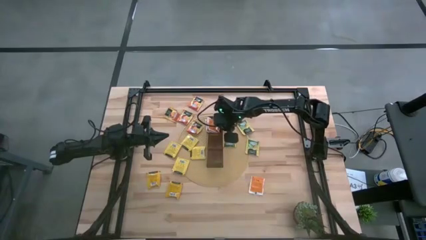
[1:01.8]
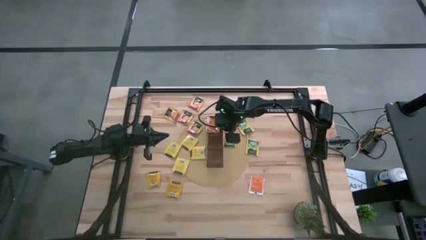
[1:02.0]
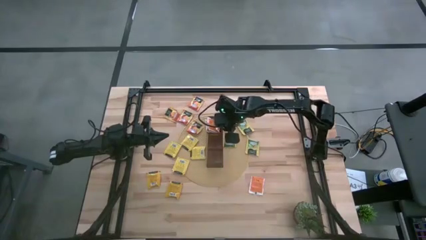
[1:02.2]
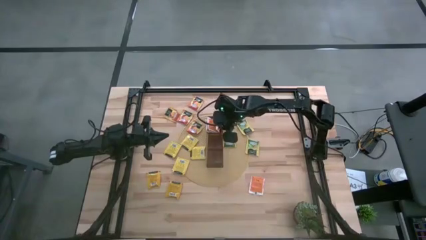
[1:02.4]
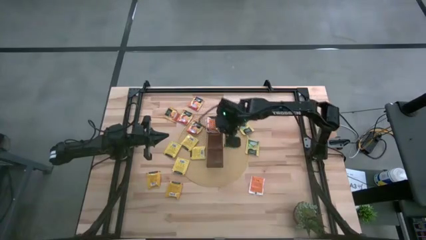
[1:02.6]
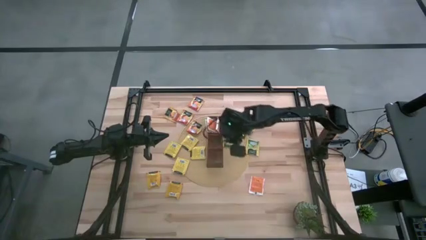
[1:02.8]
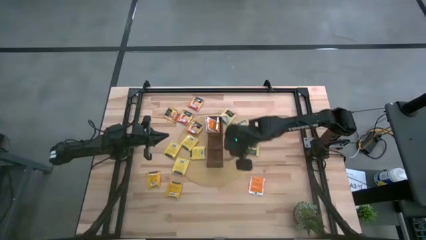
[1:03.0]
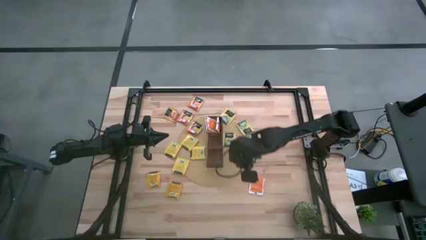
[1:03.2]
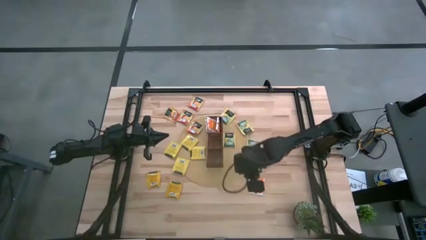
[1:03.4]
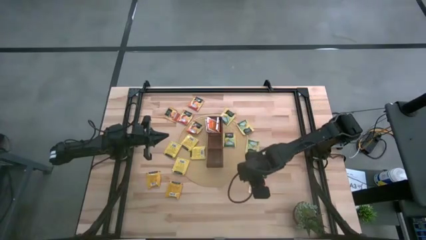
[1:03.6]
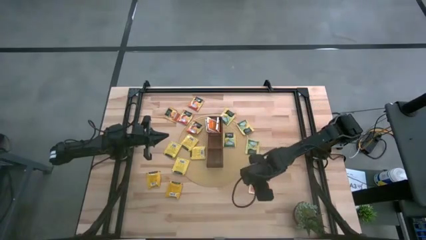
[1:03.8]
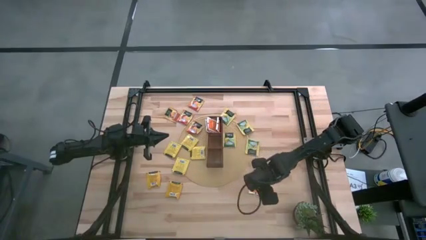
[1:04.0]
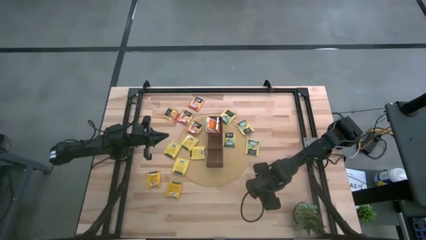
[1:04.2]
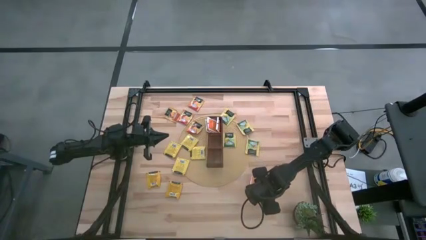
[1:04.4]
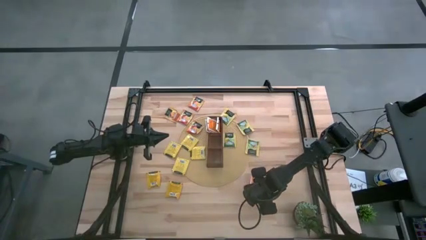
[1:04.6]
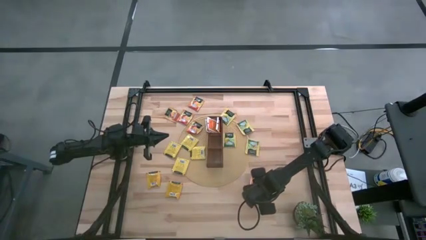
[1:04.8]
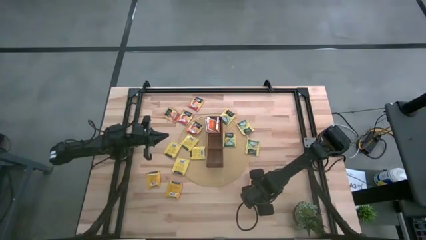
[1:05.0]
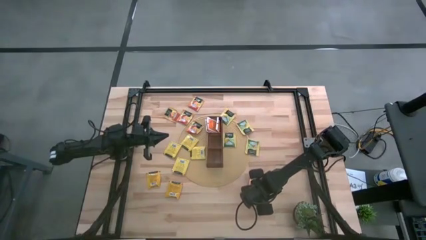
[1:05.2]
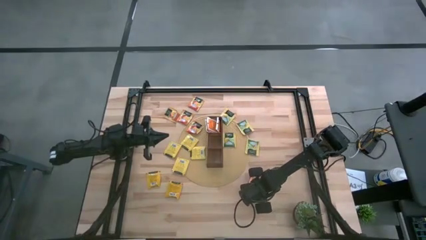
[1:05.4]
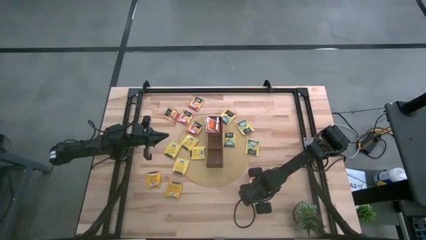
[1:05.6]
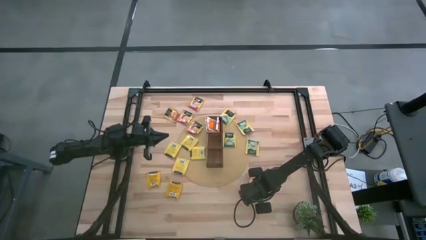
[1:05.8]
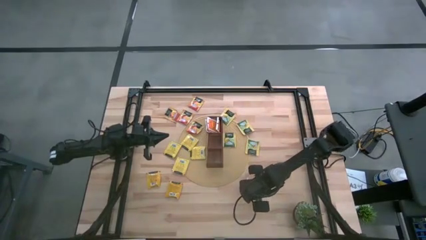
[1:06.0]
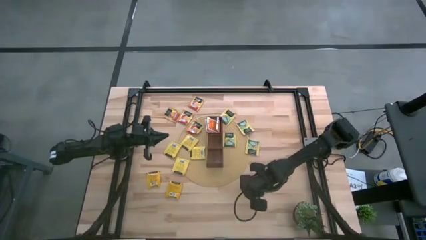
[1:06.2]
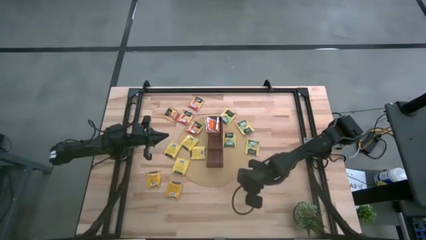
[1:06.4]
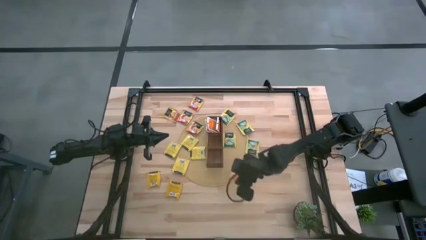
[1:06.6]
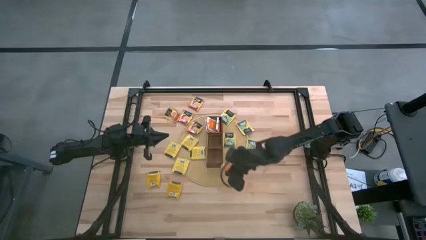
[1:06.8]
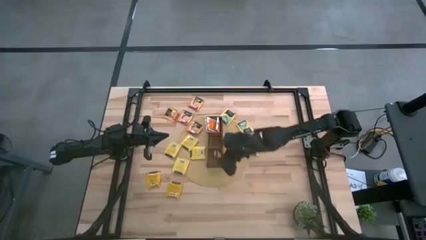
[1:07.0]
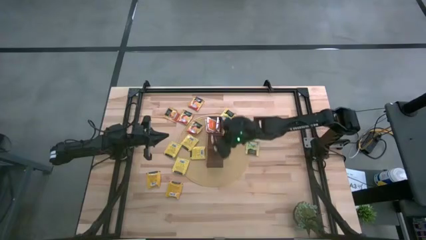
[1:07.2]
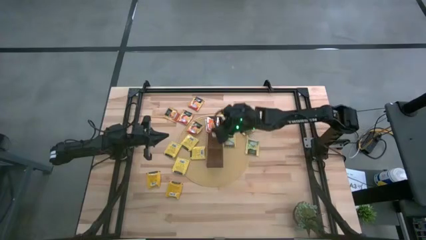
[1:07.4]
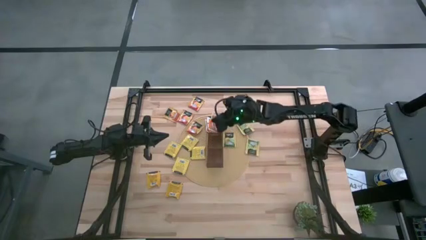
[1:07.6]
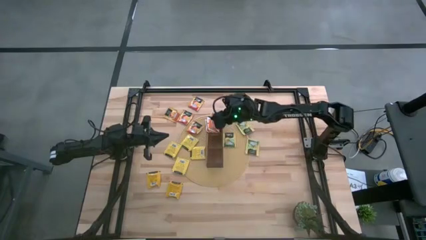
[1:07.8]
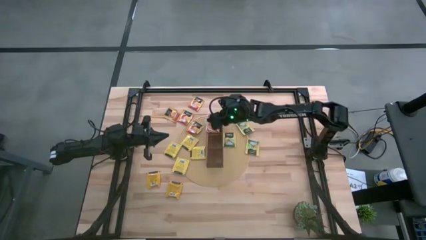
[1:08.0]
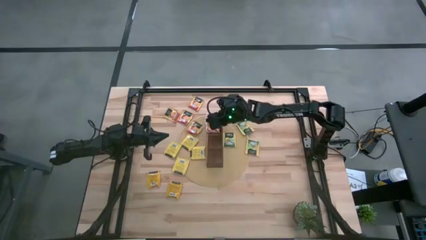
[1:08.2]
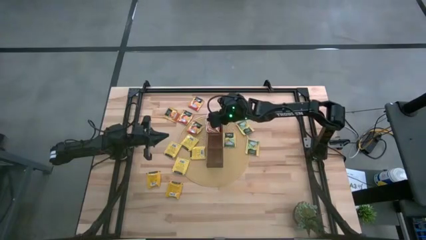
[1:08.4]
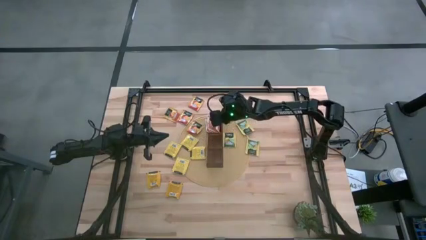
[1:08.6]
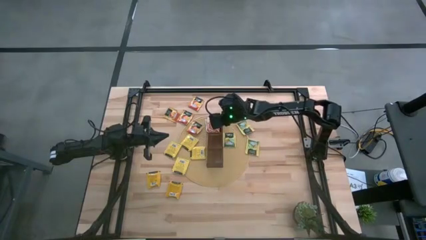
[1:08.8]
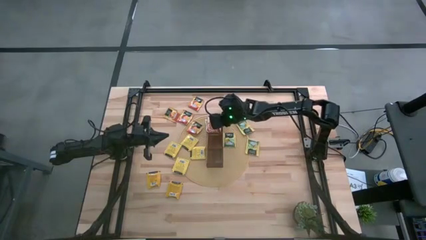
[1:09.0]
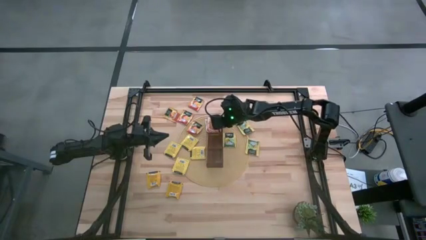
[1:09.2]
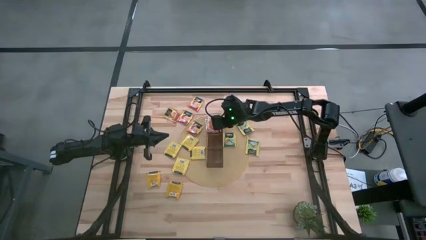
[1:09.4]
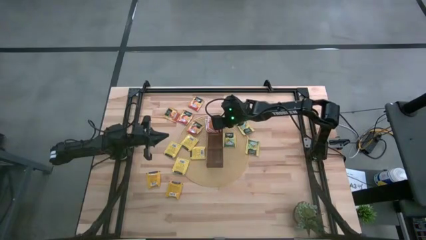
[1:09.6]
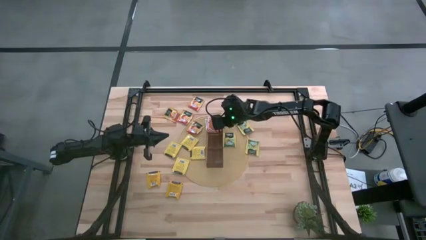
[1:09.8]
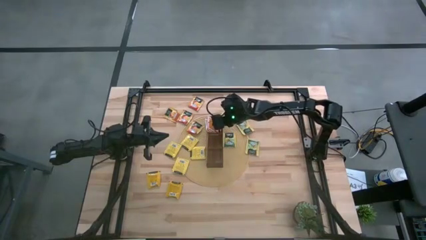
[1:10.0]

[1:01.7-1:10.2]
Task: Pick & Place Tea
Put the white tea bag into the top section of the wooden organizer

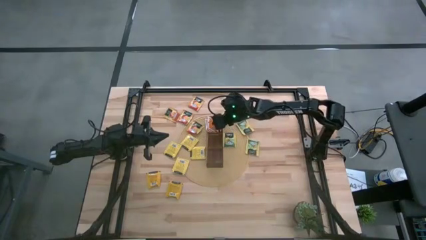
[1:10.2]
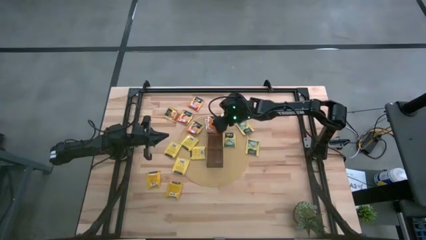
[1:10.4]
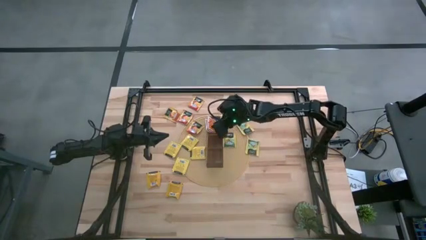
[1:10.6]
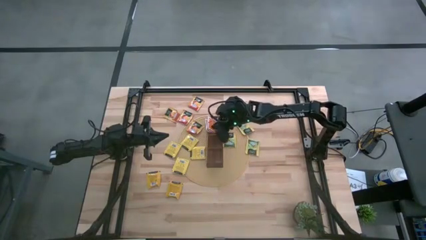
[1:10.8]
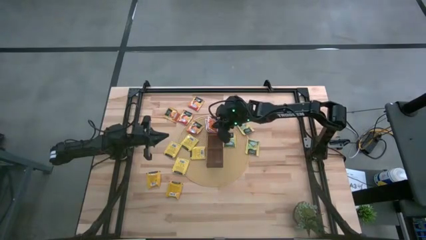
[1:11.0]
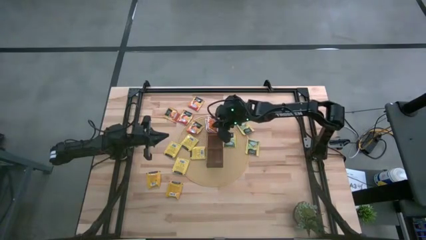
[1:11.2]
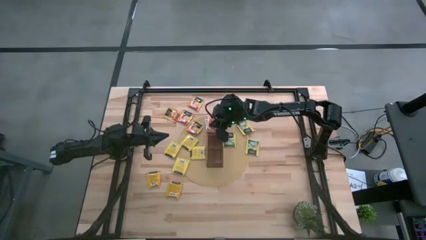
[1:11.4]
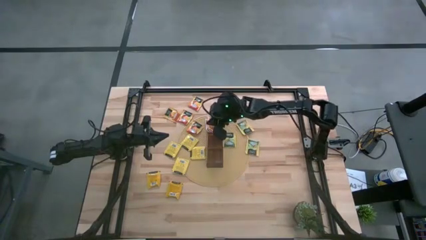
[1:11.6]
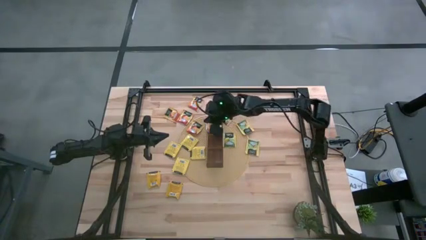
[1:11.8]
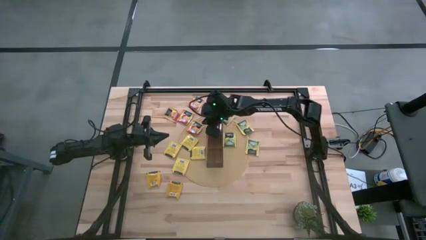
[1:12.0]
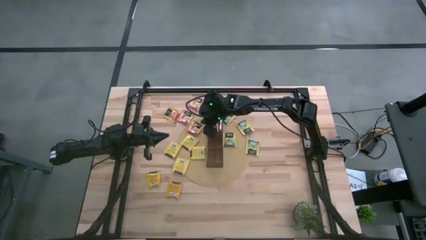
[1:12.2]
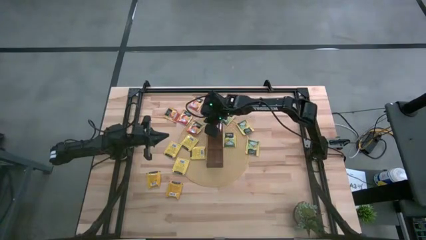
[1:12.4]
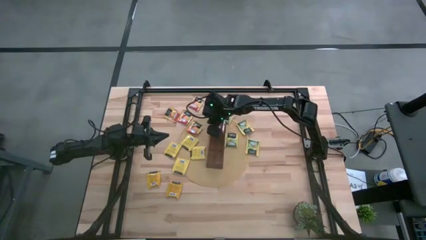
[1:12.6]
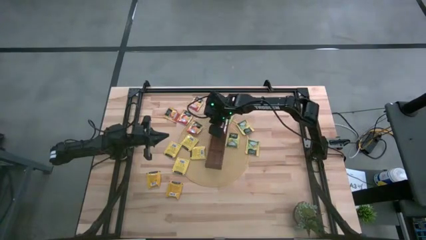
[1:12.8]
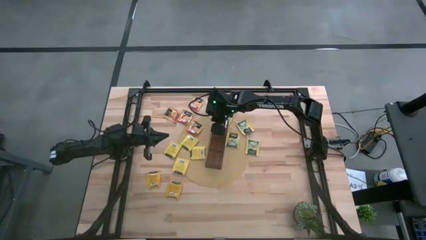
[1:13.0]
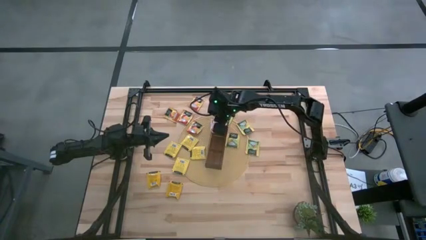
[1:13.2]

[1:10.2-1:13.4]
Adjust the white tea bags in the wooden organizer

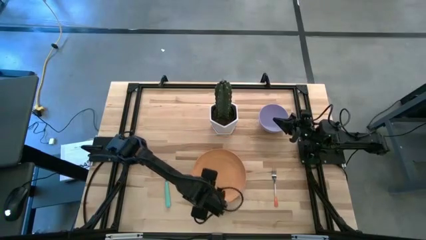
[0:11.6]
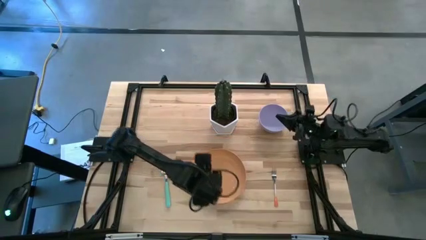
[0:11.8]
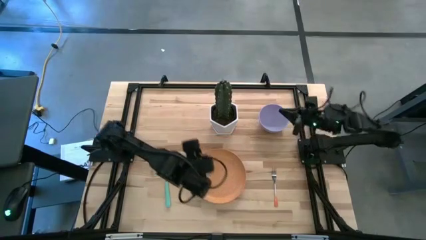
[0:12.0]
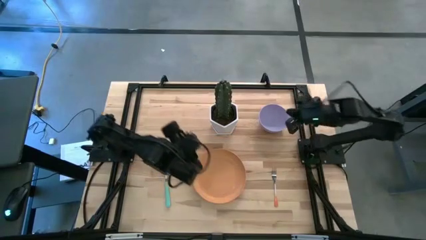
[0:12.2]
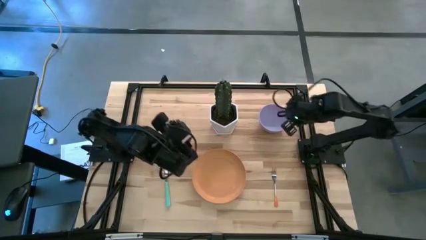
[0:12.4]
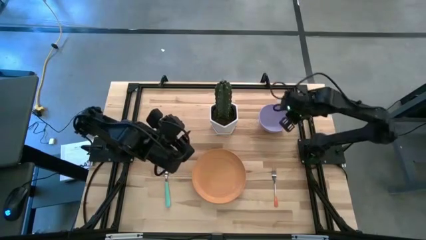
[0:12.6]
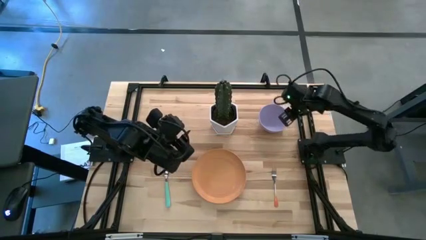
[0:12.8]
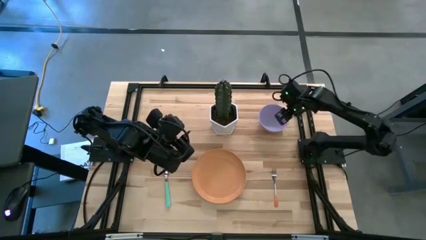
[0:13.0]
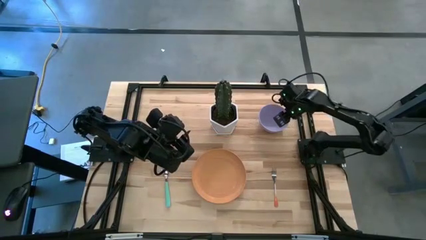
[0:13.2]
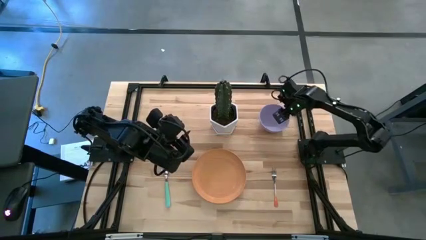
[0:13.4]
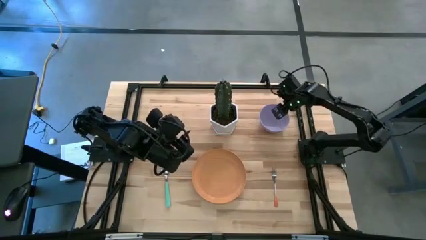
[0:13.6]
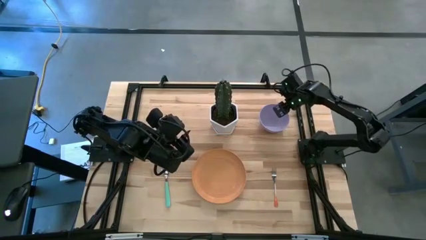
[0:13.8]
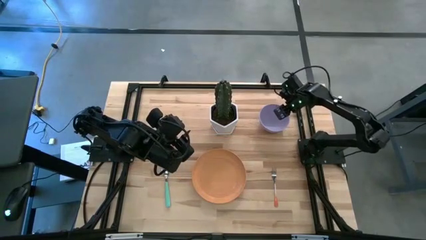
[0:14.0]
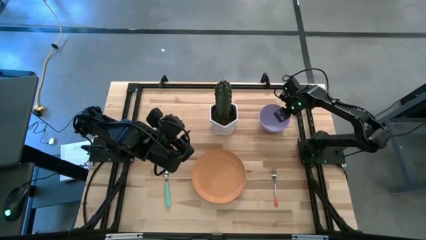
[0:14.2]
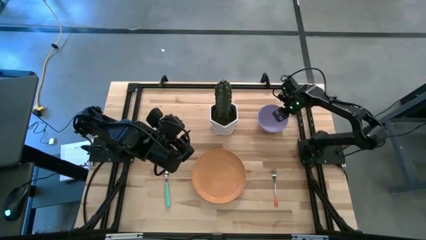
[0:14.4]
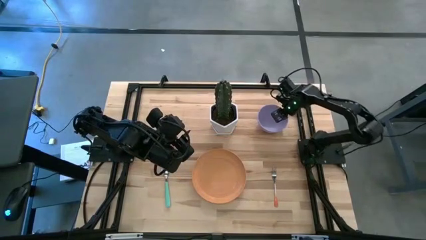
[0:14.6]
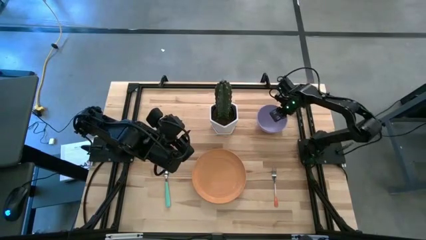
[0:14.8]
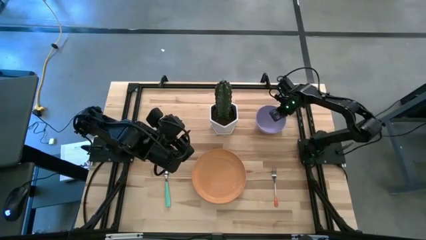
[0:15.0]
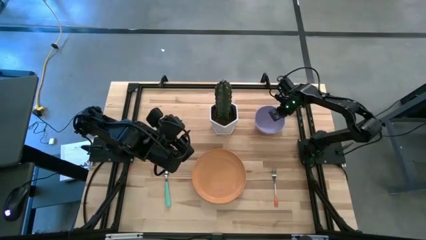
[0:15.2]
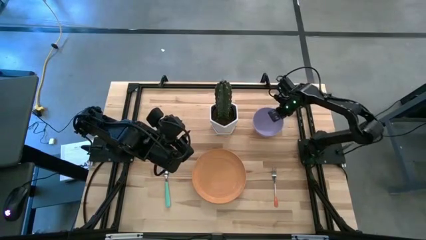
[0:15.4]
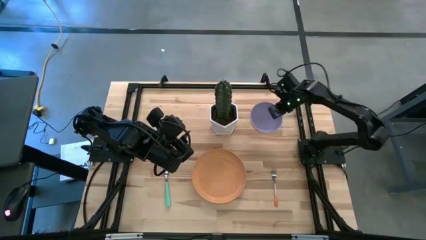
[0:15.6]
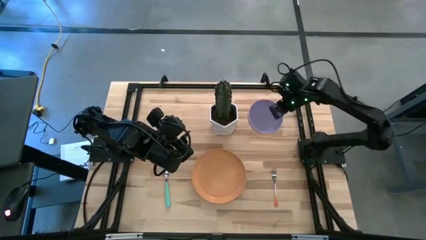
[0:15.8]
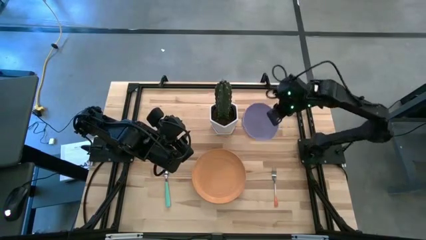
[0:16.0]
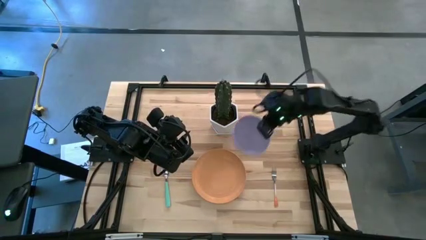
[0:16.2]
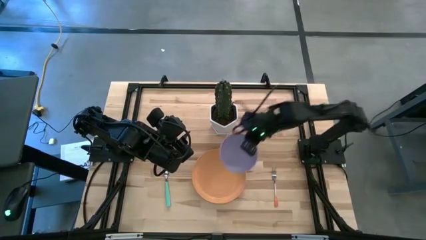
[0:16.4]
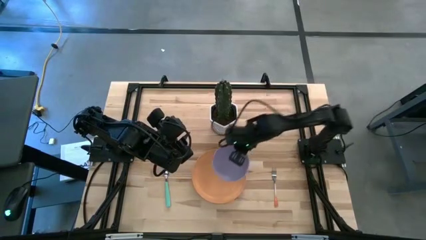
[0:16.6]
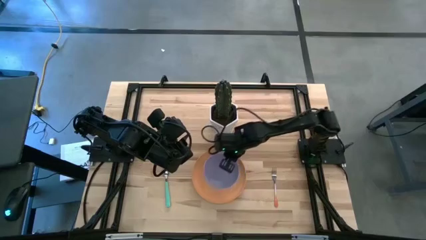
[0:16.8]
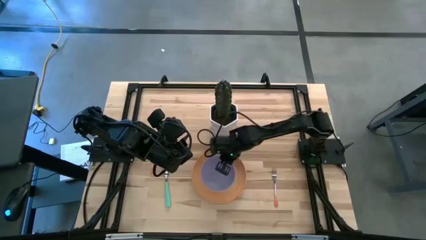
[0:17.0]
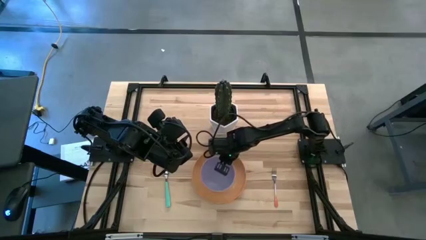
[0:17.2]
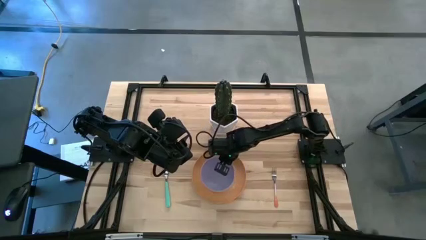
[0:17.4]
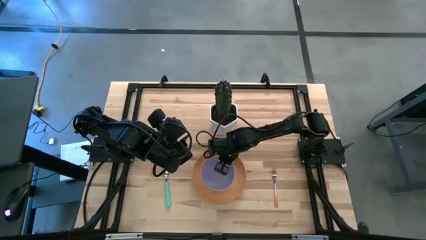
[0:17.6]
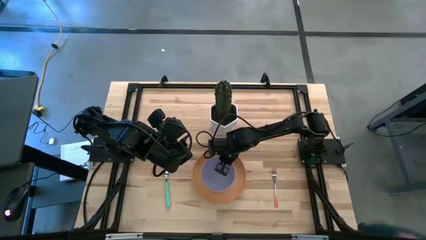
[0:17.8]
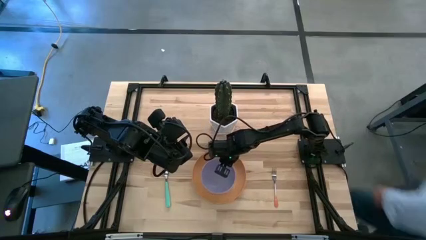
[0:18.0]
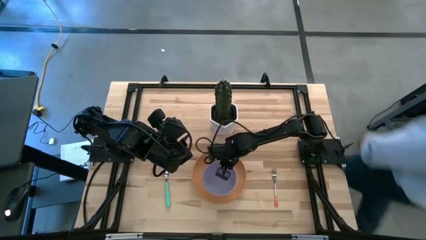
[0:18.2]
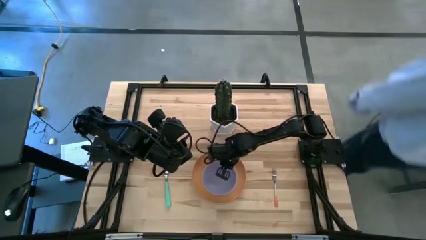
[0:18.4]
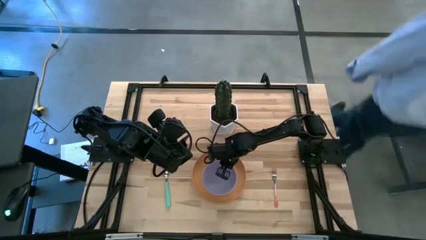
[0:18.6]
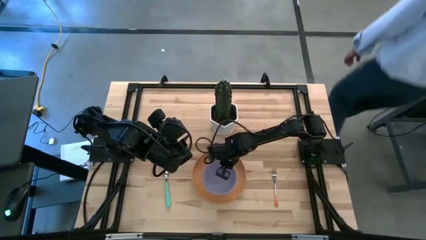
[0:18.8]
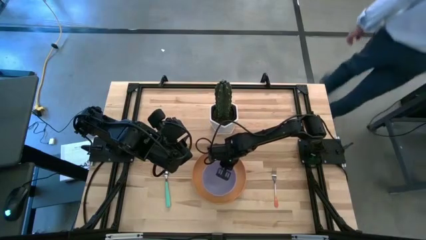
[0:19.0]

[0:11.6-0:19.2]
Task: Set table place
Put the purple bowl on the yellow plate
